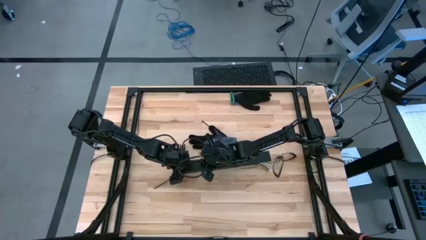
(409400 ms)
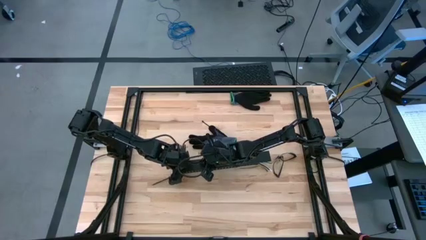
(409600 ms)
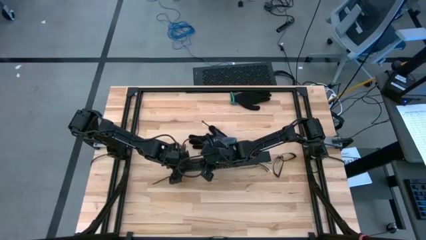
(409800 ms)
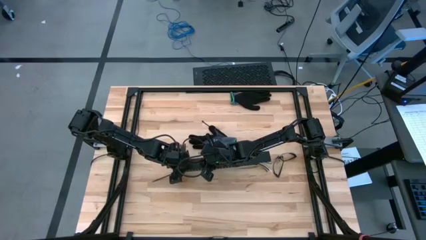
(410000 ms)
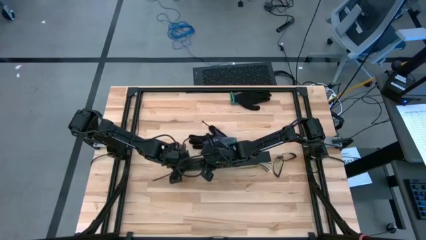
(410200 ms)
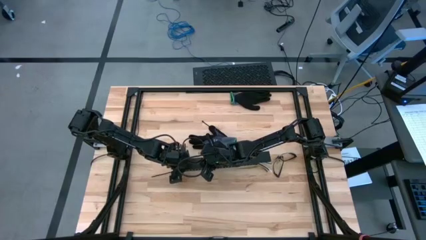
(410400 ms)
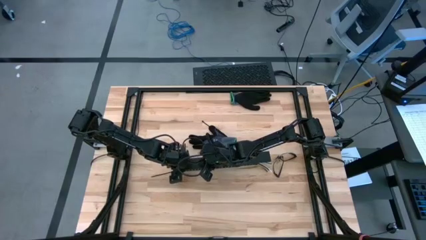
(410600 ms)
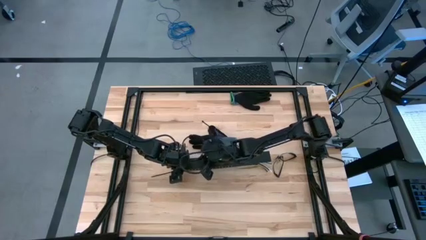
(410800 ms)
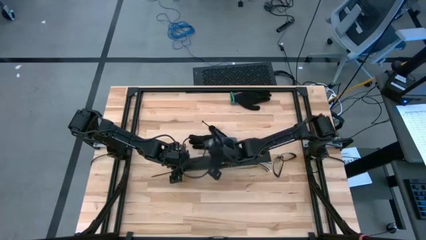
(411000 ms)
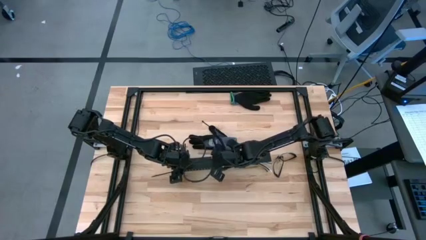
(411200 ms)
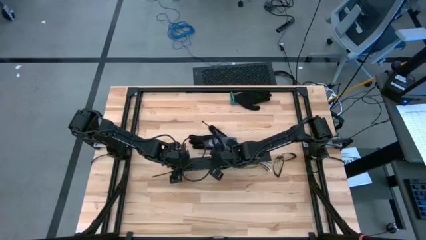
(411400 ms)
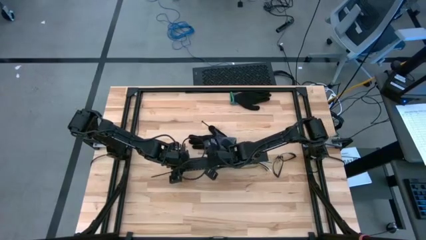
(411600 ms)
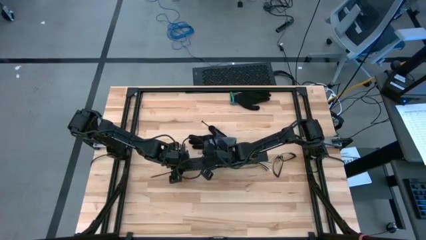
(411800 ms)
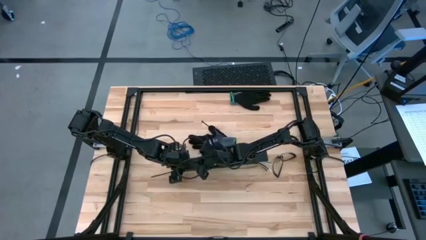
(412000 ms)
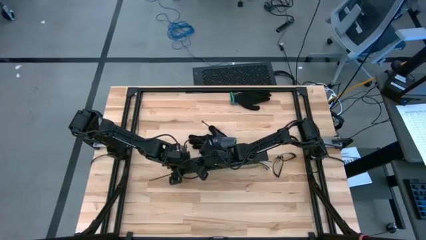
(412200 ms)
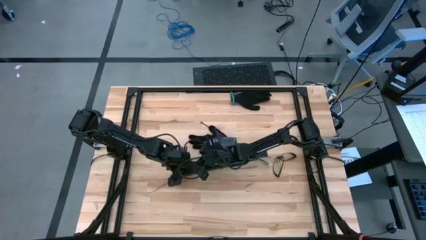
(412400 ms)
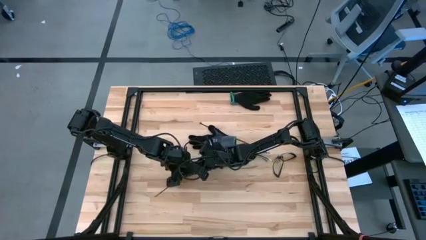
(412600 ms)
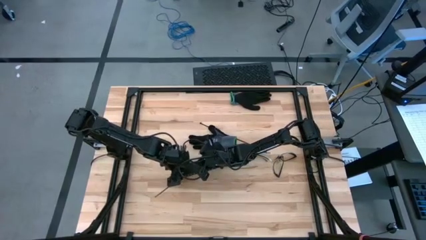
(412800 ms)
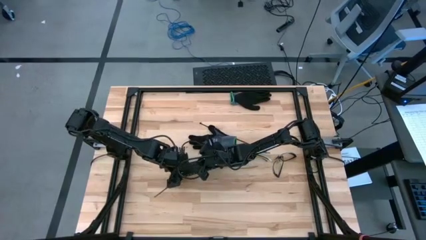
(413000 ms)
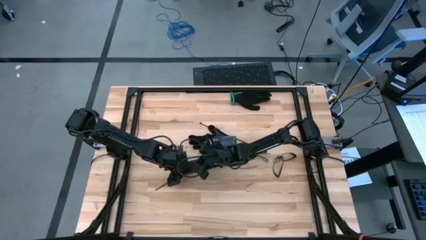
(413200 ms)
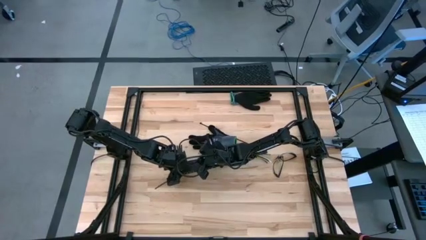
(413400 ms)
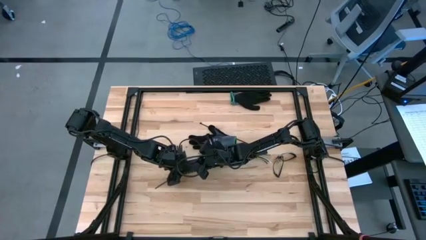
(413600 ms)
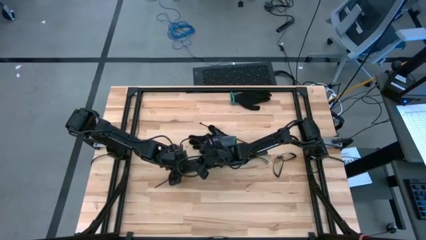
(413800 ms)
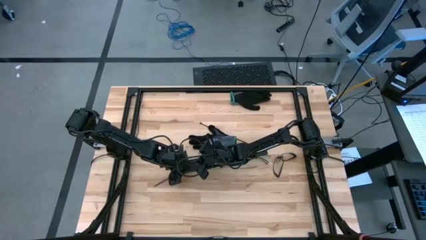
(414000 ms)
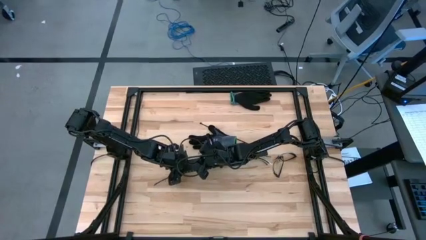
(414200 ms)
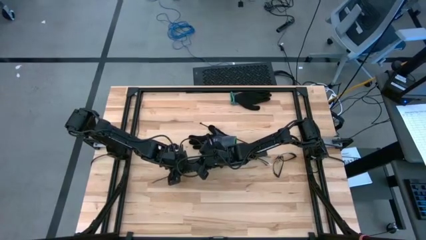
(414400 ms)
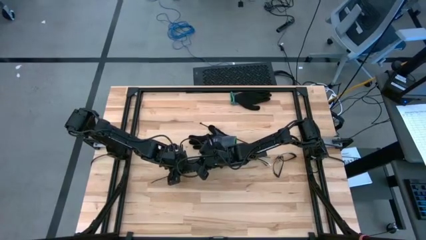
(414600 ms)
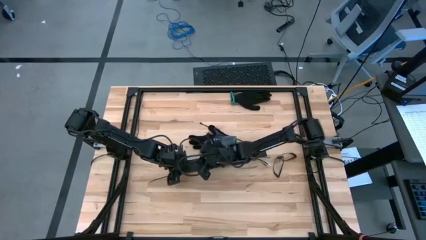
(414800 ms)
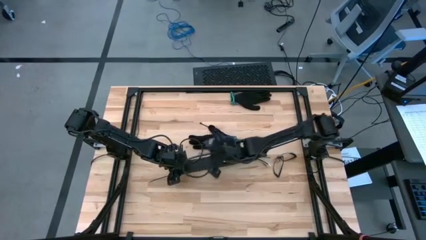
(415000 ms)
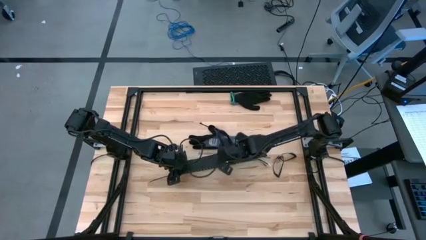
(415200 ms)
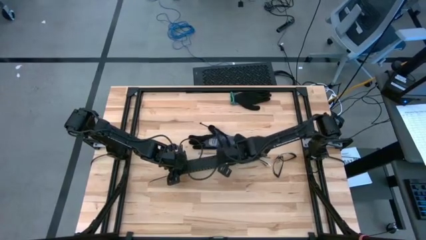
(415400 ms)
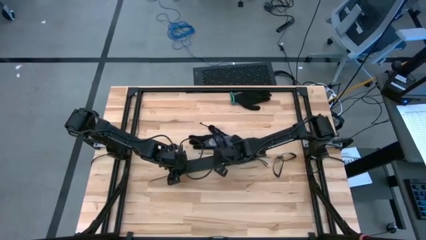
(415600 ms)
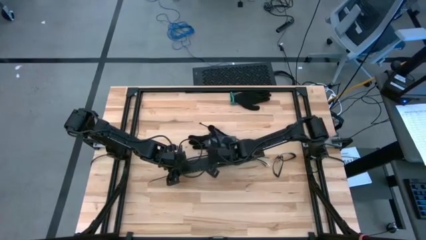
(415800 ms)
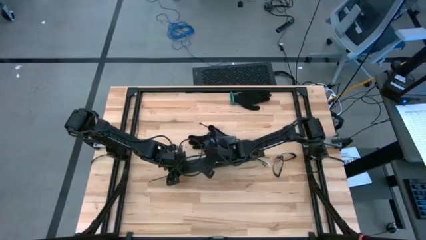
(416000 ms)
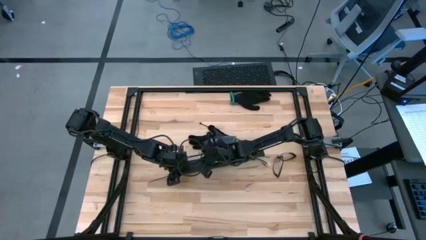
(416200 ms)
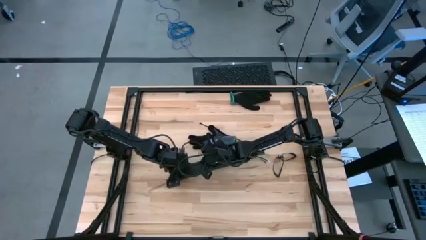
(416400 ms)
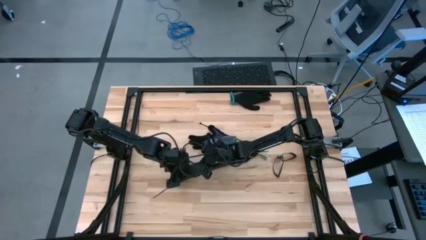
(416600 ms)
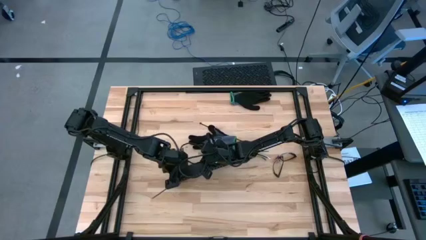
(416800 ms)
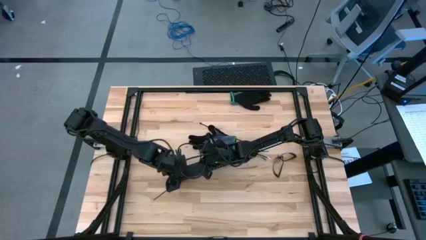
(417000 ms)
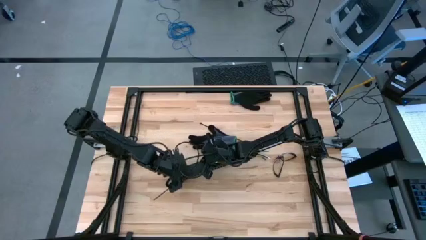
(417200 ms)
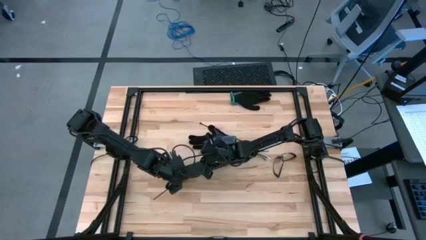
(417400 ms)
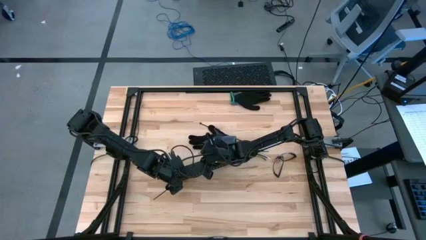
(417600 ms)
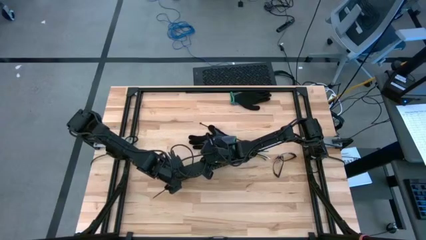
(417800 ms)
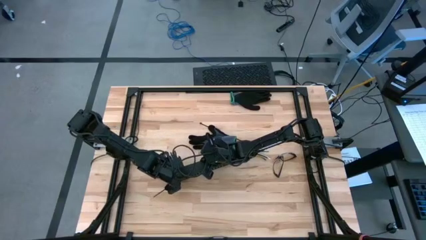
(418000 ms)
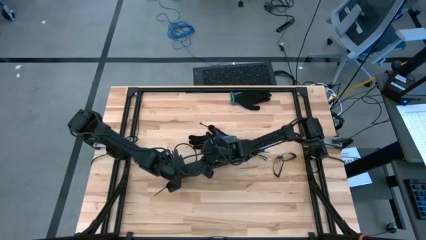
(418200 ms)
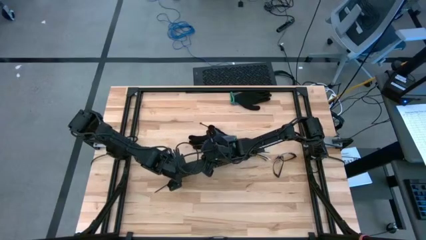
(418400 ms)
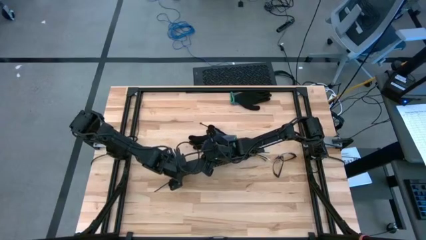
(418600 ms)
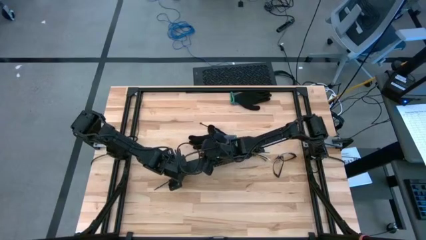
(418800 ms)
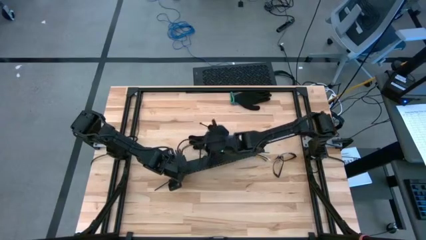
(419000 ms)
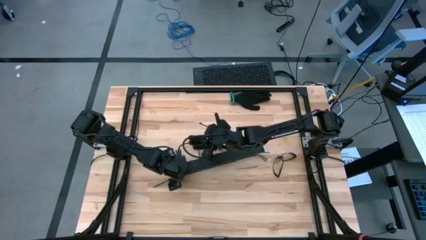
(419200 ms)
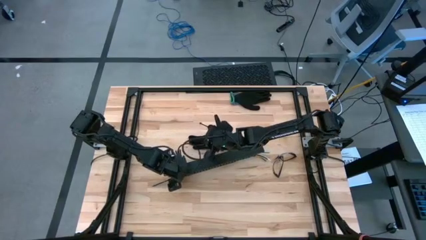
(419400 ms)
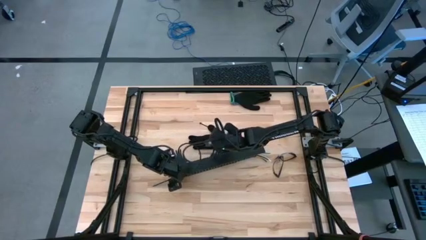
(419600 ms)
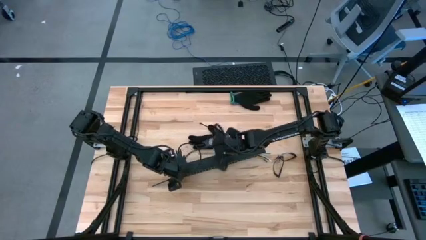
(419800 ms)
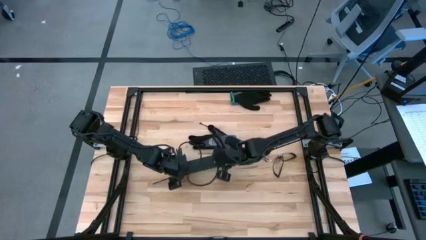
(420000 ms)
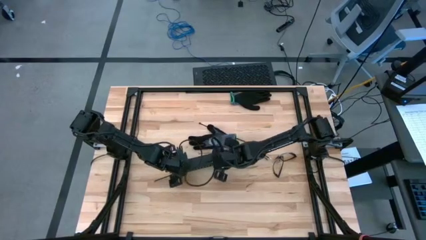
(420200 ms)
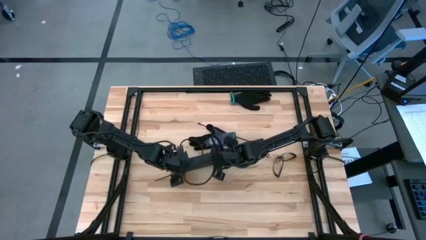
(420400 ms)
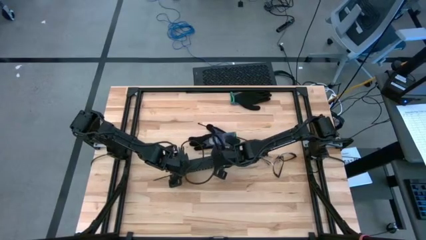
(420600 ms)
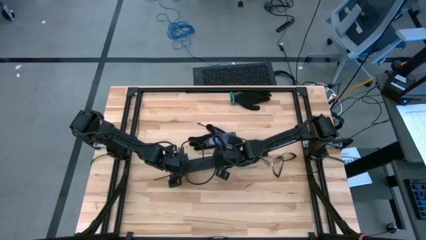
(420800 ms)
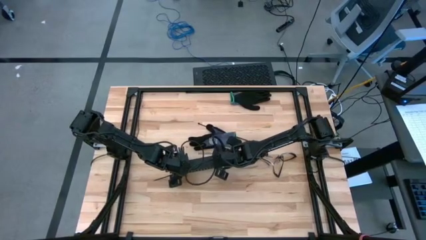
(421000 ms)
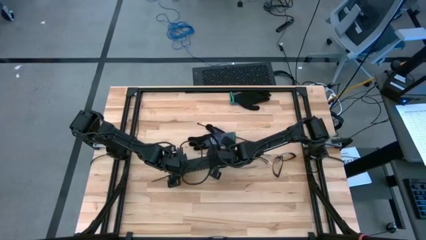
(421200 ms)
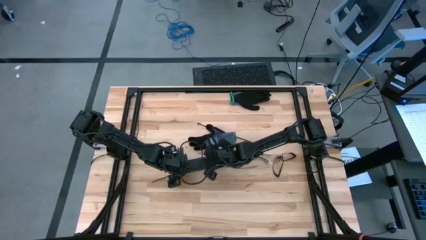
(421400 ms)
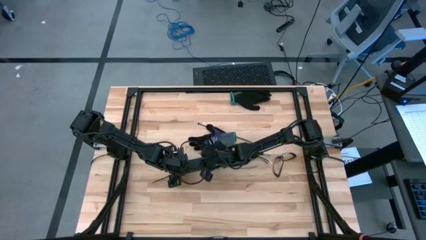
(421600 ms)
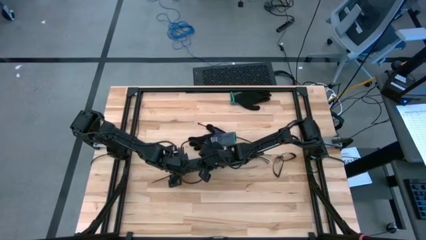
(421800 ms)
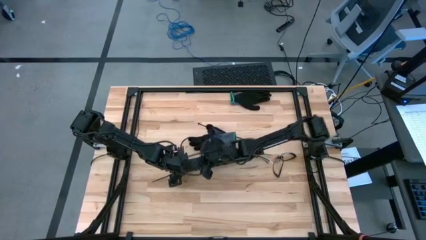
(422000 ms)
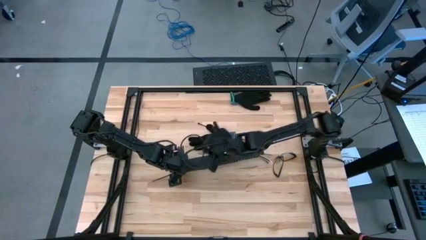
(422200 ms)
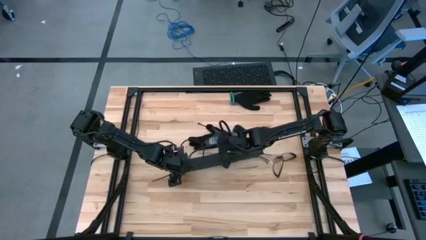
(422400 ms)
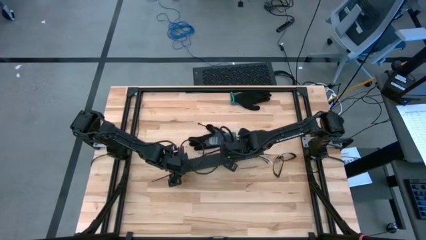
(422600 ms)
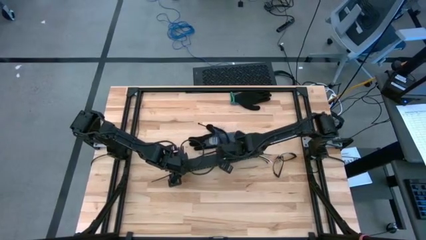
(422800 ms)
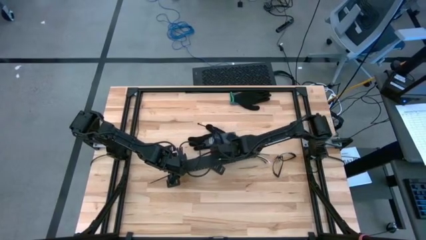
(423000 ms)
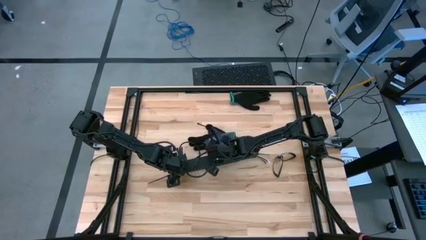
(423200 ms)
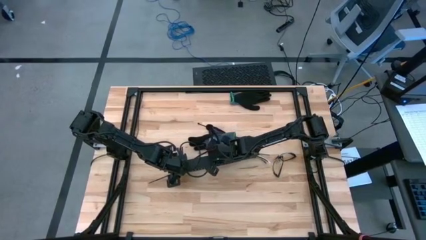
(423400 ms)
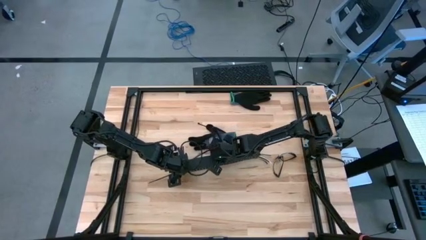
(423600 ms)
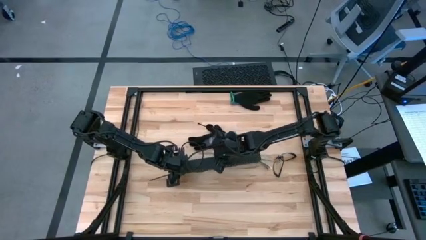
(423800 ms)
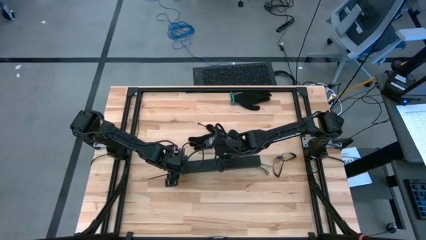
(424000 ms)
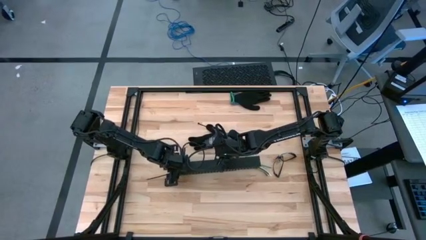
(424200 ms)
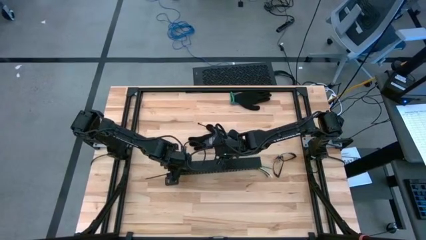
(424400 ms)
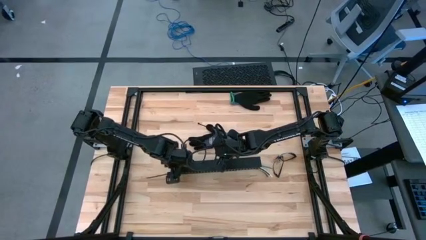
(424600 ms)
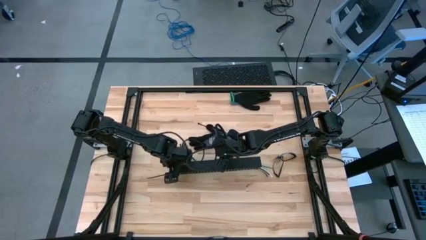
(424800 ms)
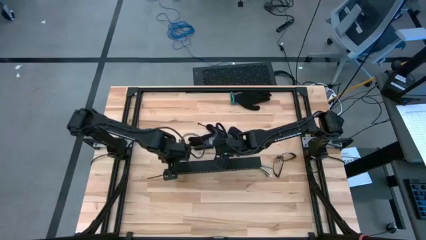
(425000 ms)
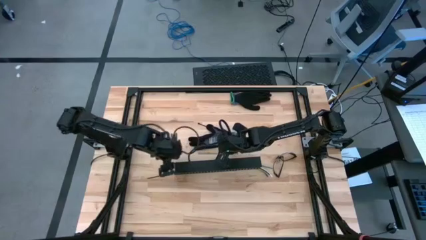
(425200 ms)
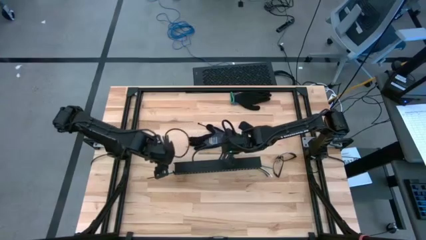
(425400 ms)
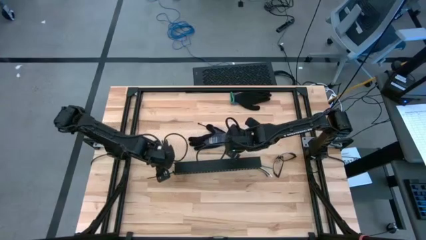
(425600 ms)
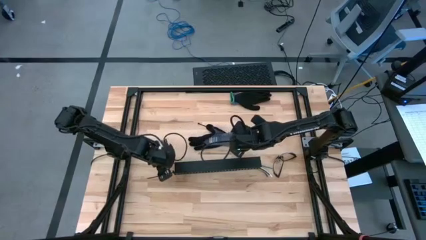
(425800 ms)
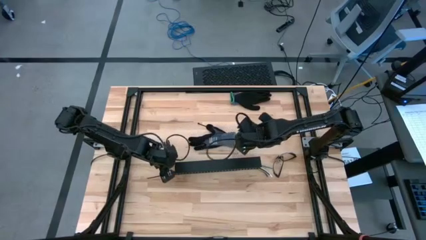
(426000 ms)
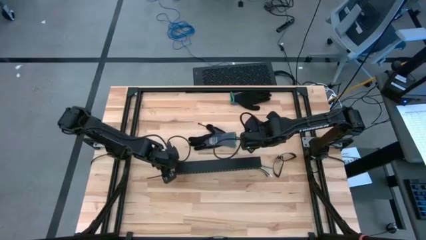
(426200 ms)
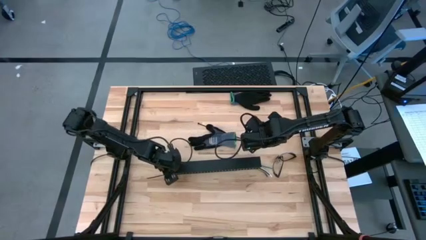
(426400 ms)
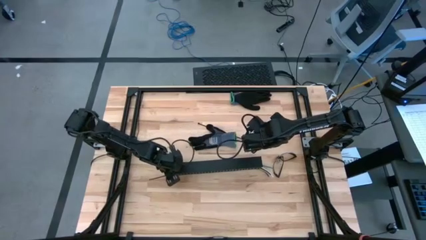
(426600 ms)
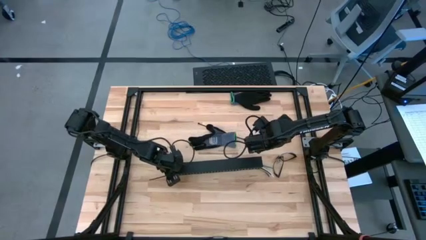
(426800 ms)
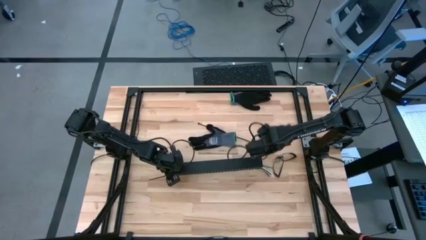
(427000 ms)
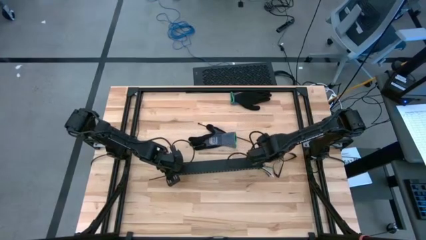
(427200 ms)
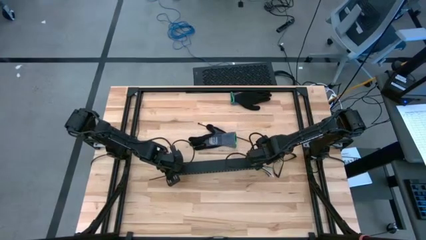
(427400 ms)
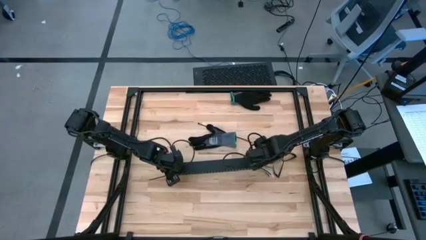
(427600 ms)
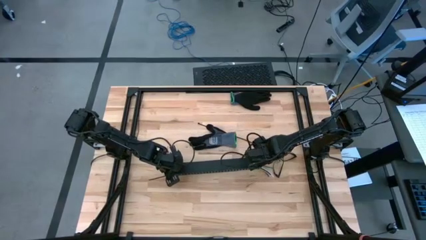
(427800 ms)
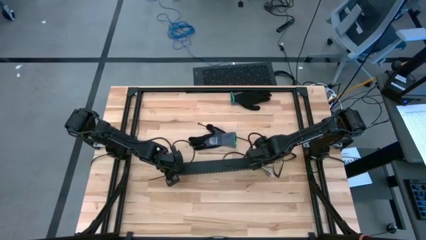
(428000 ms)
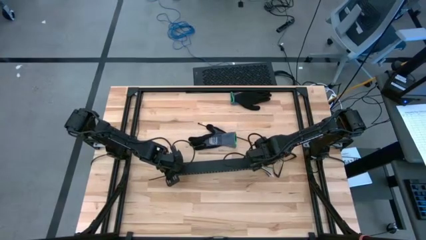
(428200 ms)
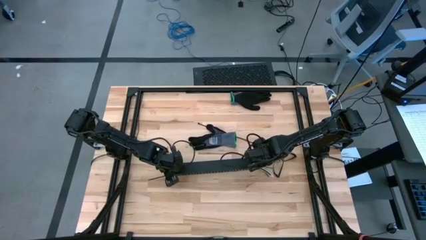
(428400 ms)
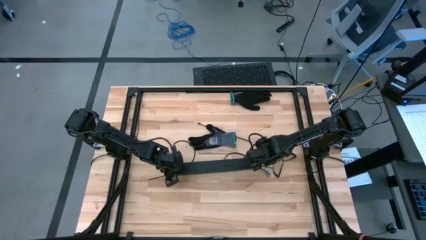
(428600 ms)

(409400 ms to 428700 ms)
Task: Ziptie cables
Close the black cable duct
